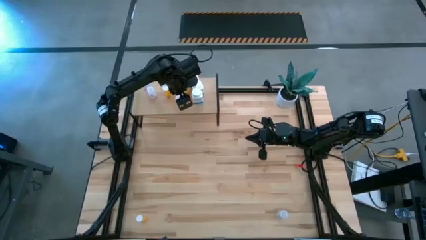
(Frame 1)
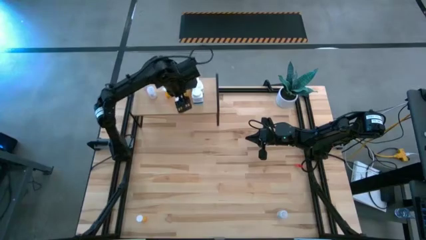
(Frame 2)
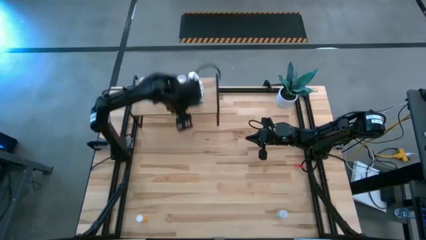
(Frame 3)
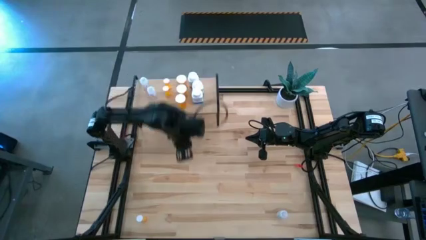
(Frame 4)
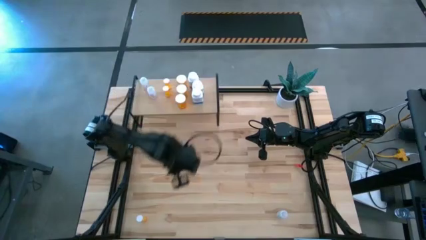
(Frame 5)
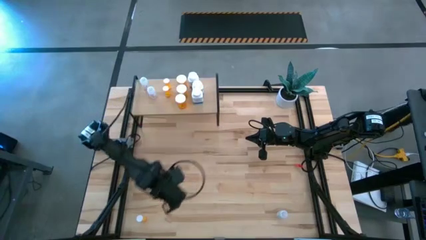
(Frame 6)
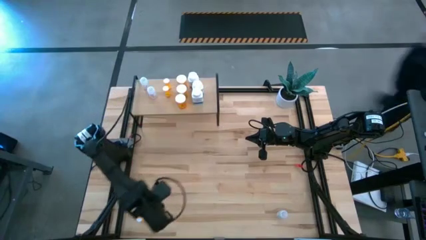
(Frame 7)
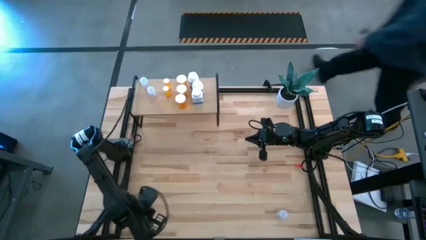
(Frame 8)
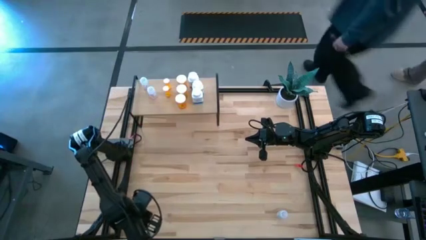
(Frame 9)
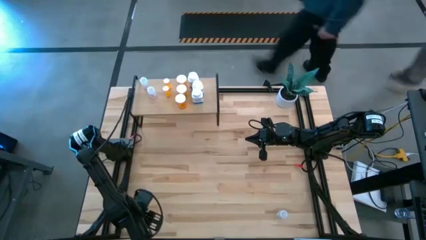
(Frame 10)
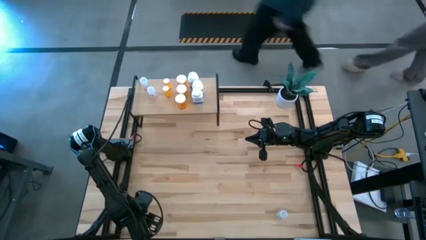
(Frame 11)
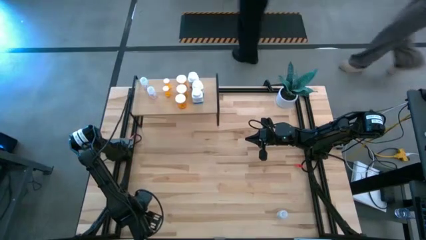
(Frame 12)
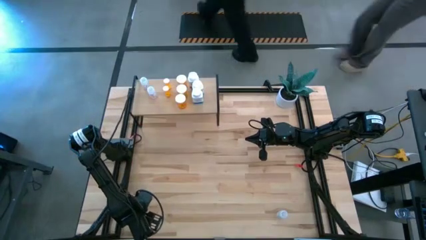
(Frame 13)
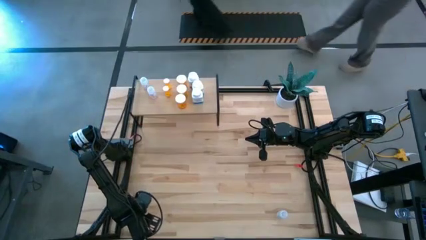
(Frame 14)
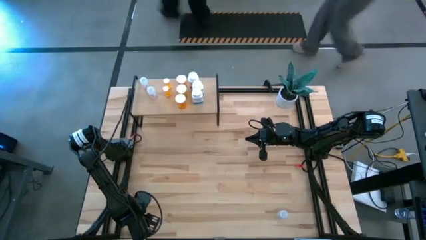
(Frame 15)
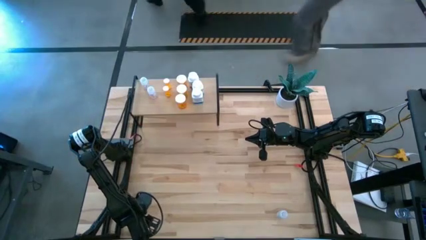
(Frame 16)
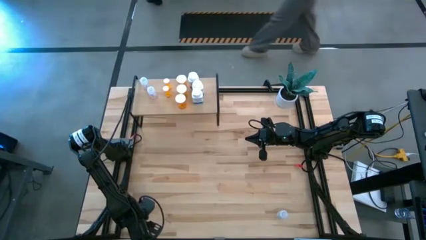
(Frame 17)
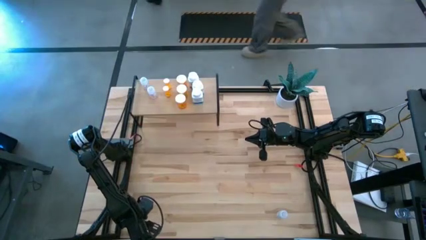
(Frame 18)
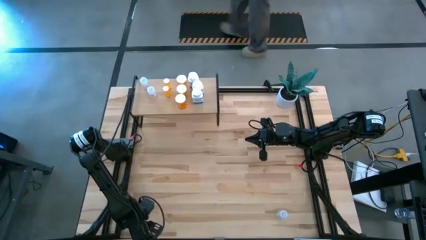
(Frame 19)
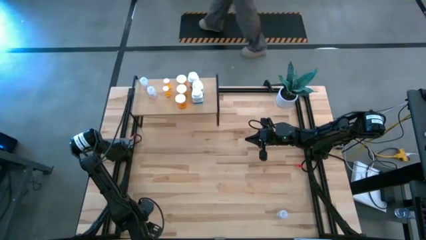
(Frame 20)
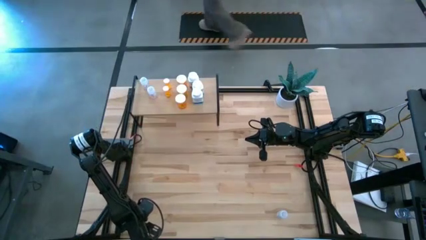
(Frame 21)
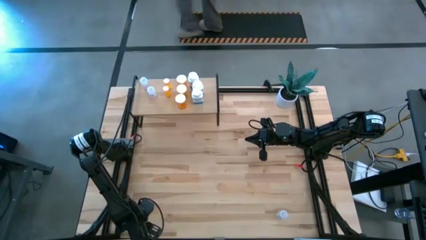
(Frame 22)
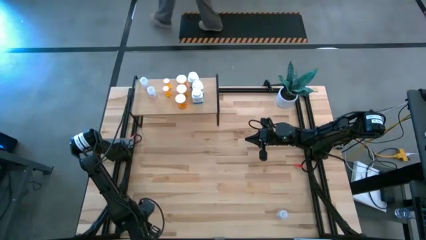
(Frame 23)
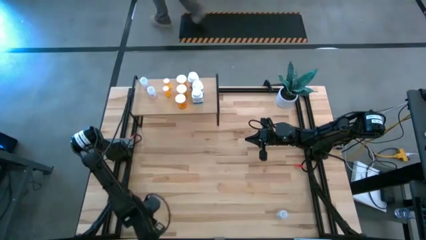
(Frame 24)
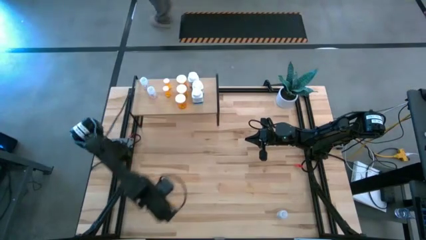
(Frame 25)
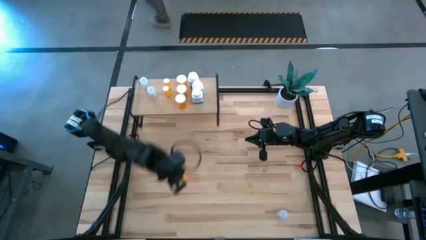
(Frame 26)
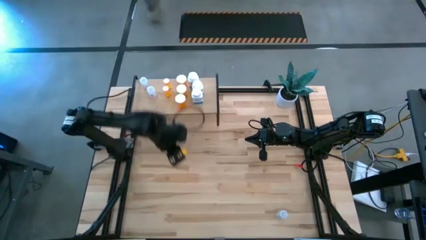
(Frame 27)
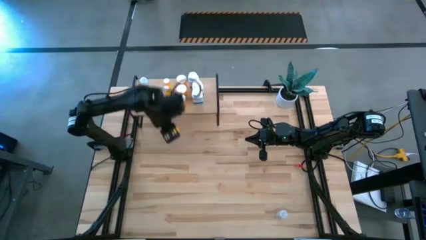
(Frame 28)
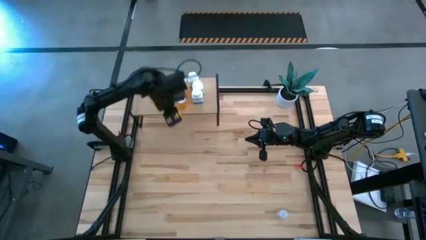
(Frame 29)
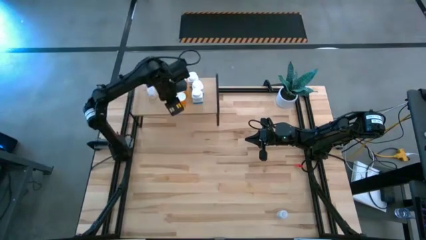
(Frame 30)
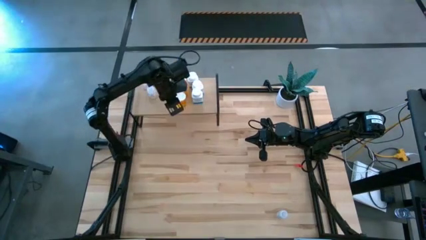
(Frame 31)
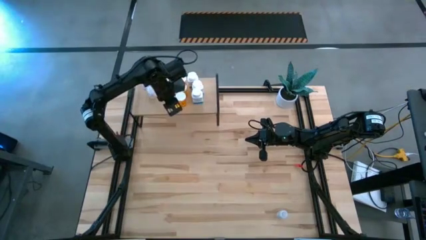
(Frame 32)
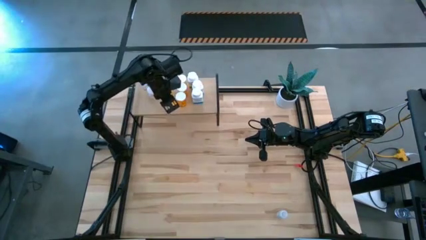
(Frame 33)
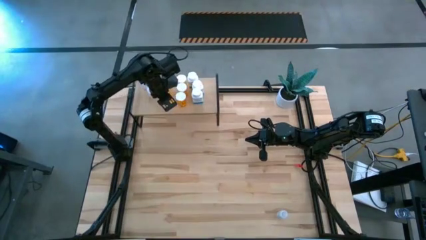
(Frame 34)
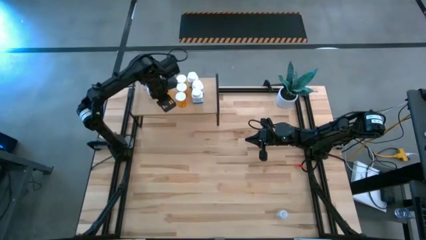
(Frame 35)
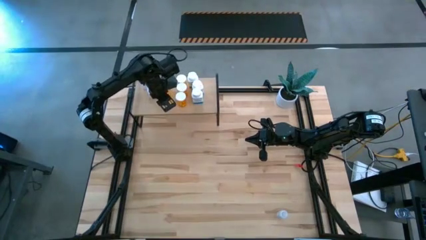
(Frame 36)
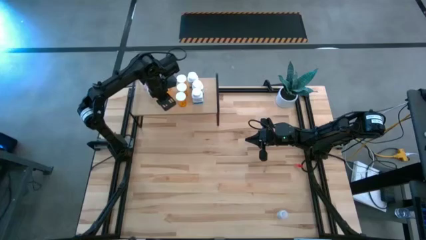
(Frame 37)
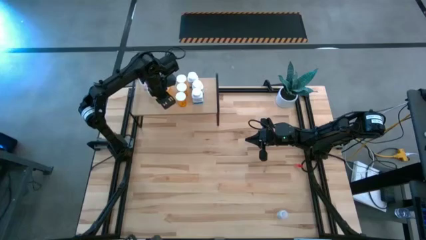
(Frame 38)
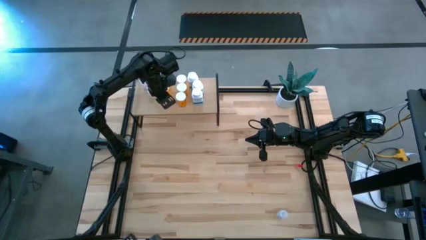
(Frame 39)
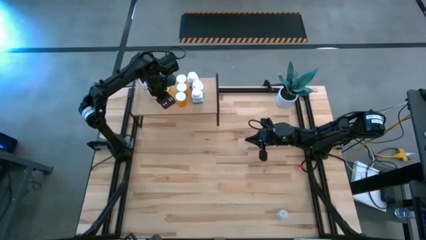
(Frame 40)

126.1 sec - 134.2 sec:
Task: Pick and place medicine bottles onto shelf by color
Put the right small orange pill bottle aligned with the other small orange pill bottles on the shelf

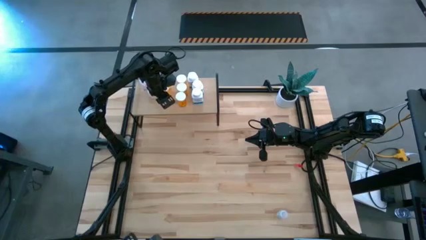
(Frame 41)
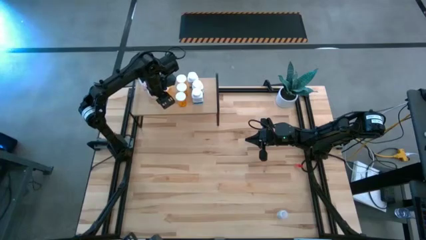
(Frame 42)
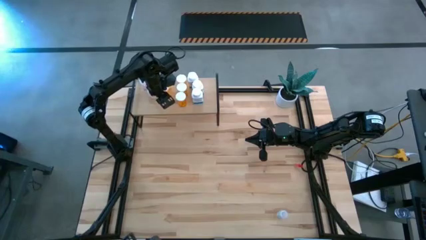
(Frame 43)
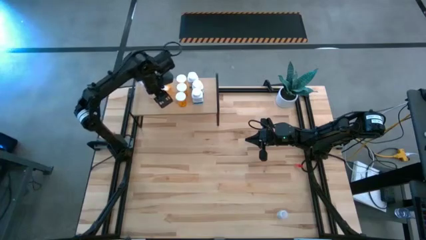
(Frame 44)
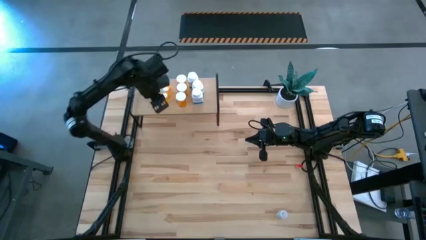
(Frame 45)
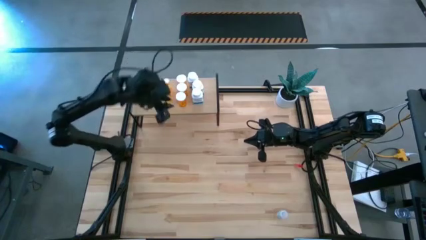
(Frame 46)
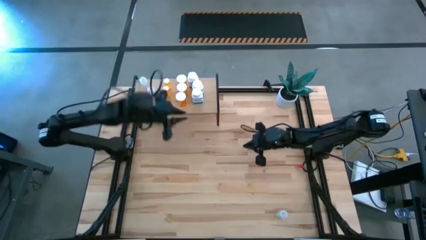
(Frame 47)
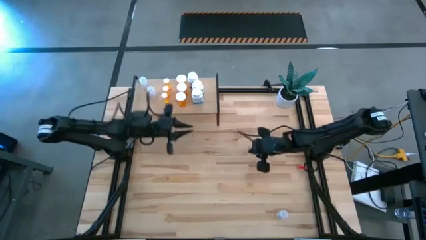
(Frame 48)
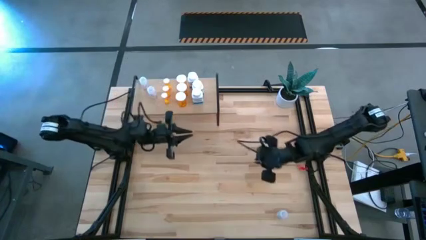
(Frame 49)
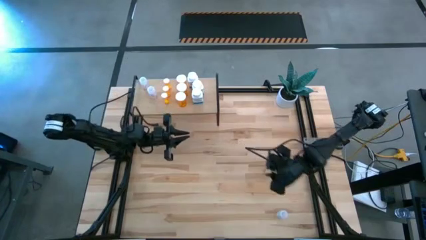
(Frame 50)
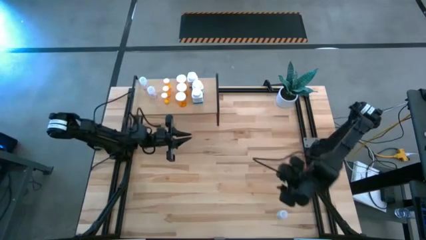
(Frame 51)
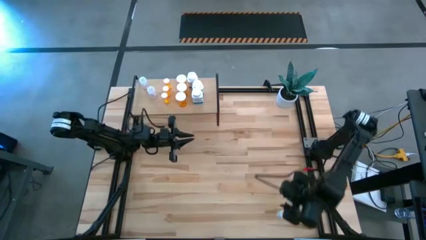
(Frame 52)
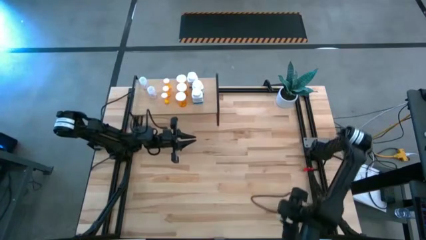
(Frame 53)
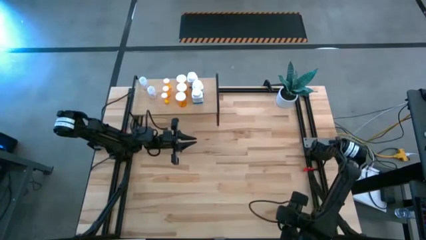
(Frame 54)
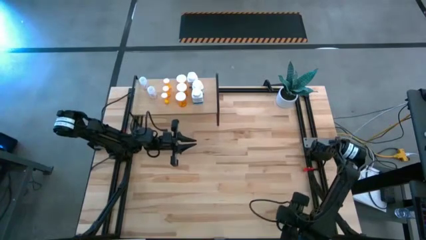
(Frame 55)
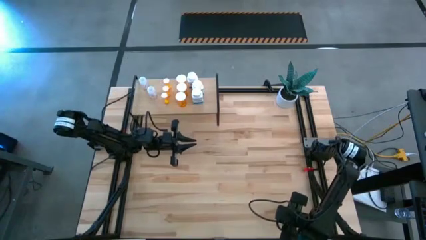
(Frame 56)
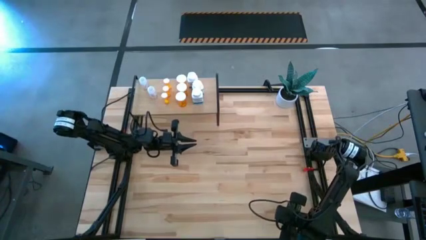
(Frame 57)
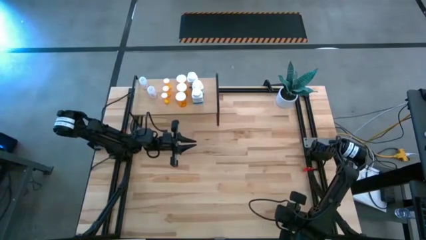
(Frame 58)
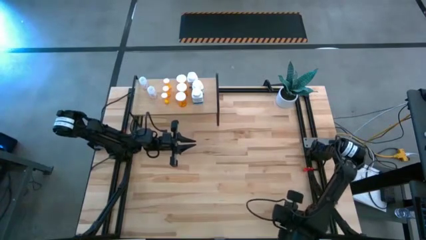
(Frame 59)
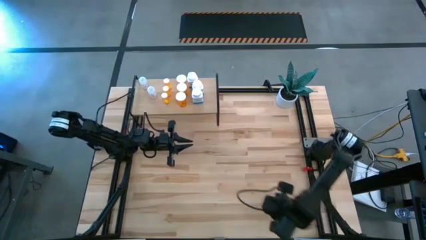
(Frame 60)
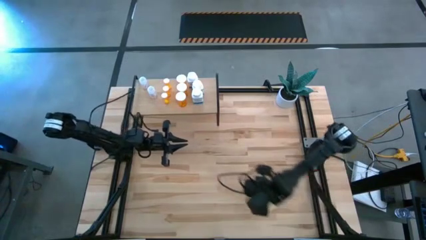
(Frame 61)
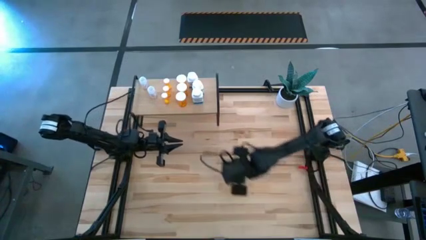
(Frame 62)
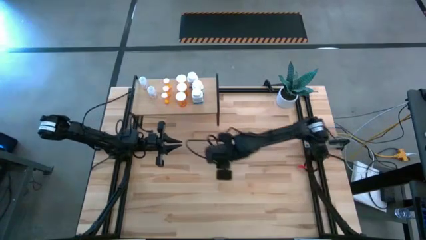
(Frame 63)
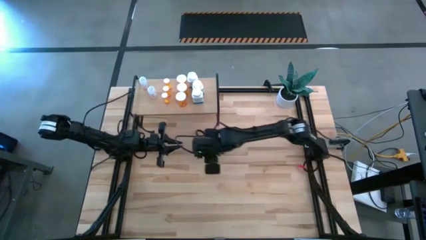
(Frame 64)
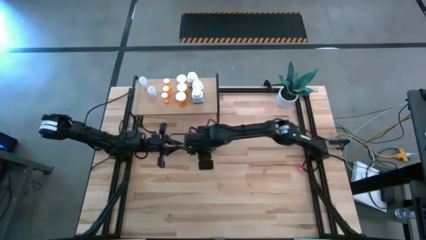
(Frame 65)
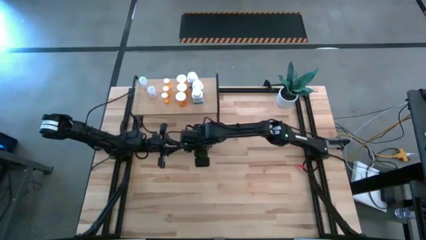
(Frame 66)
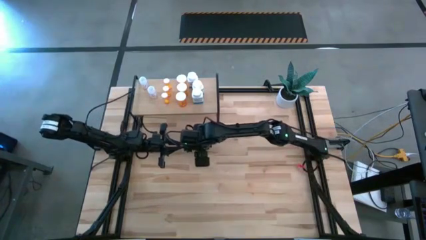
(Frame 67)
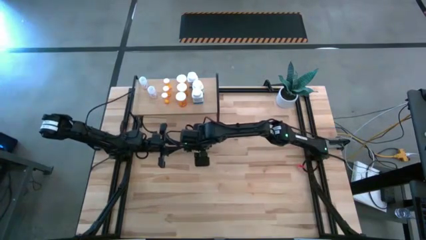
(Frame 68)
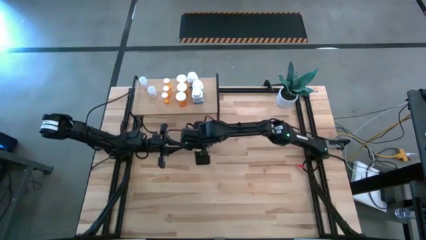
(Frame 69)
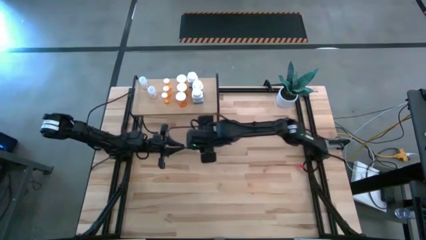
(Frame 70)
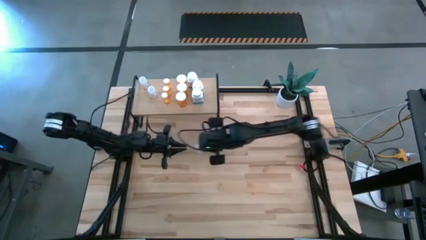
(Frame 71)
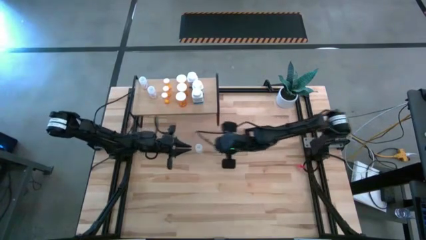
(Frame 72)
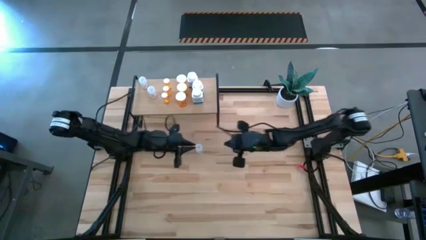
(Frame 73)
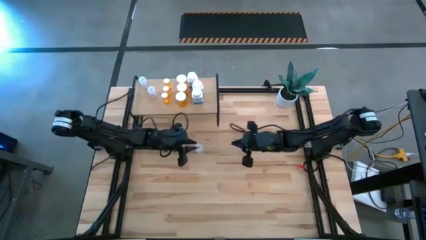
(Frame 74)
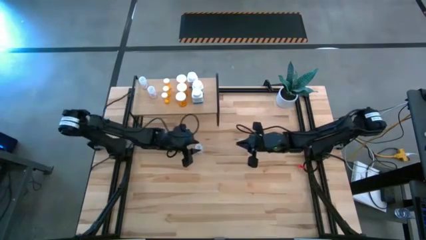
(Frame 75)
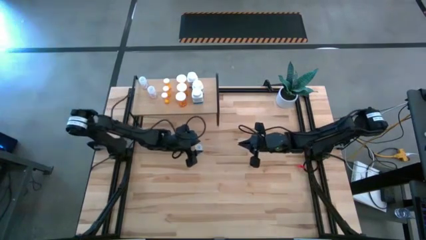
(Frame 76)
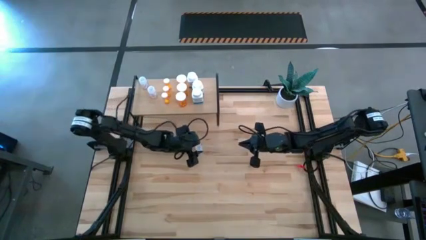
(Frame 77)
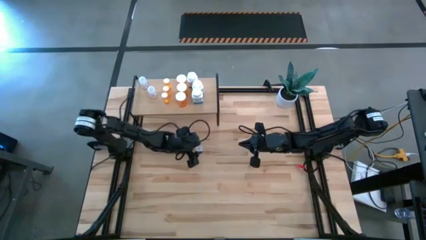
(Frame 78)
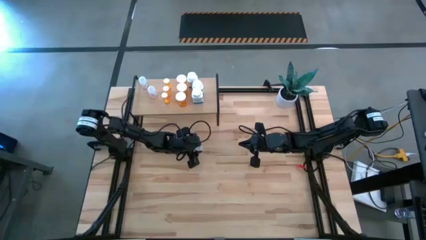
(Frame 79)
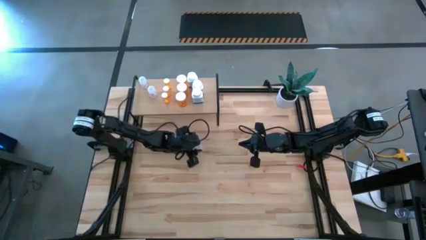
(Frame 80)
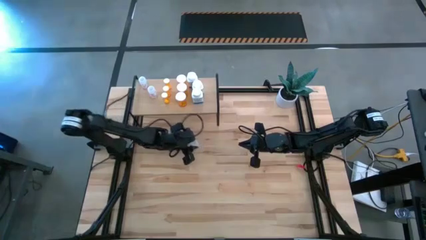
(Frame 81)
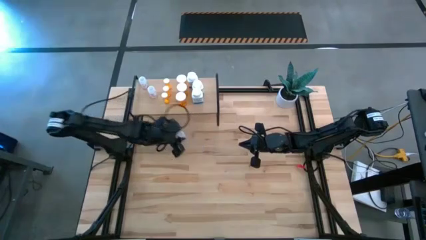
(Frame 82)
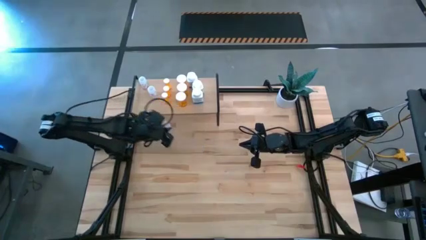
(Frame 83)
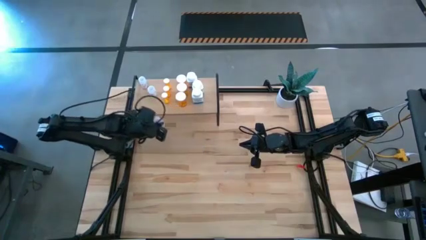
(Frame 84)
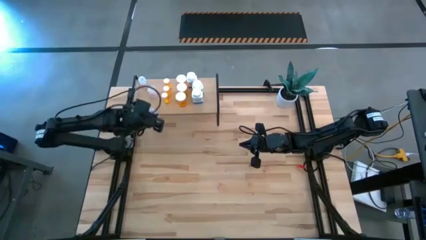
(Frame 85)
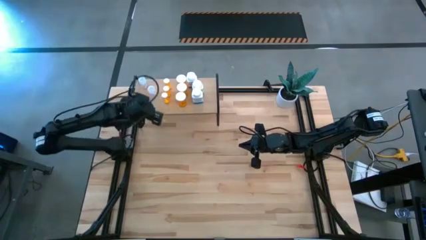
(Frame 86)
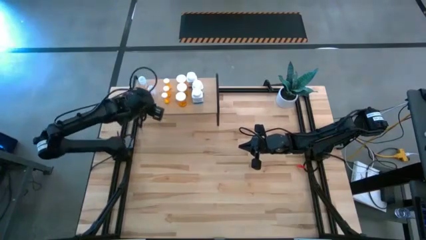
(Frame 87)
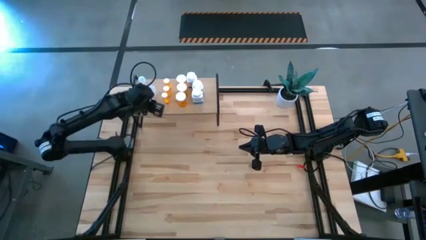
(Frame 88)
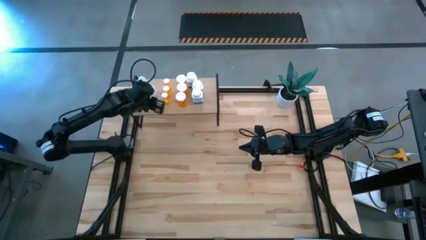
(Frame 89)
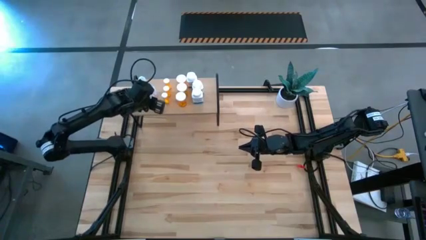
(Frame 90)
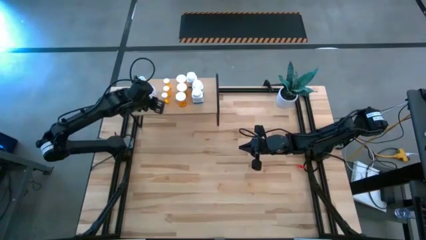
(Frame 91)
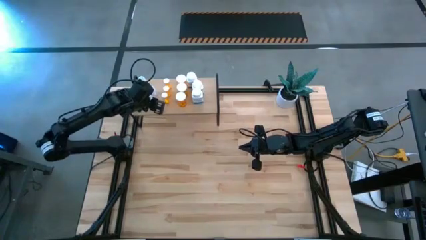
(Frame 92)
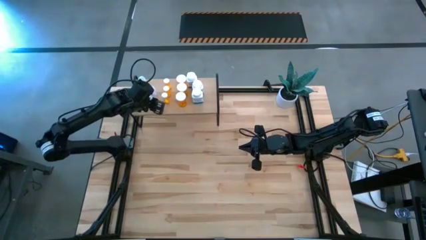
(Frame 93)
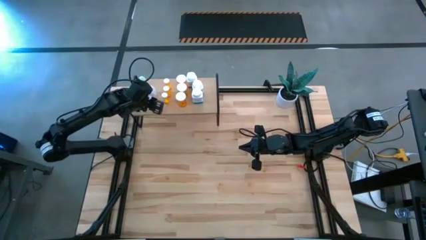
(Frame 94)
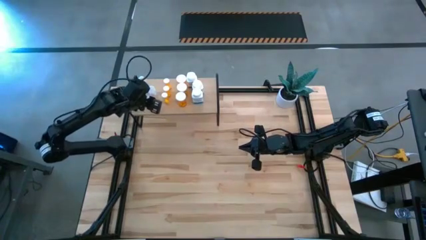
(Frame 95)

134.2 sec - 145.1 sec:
Put the transparent pill bottle aligned with the other transparent pill bottles on the shelves
